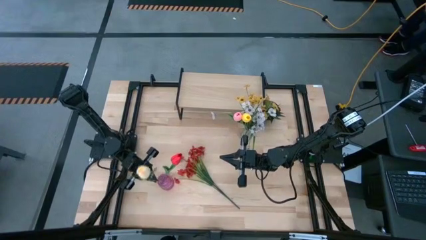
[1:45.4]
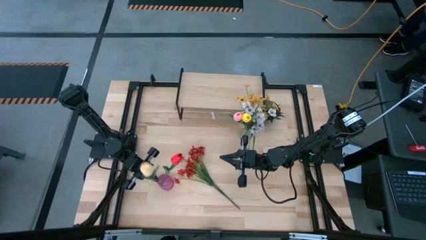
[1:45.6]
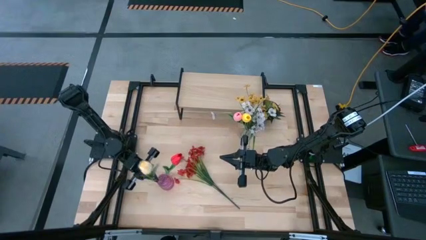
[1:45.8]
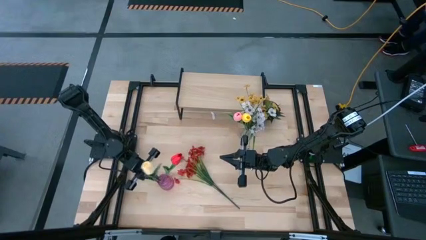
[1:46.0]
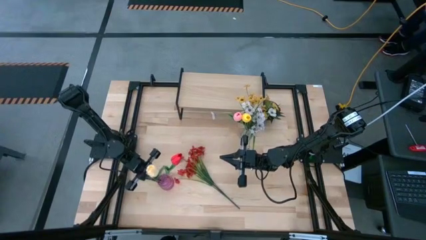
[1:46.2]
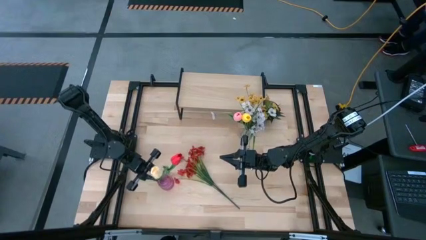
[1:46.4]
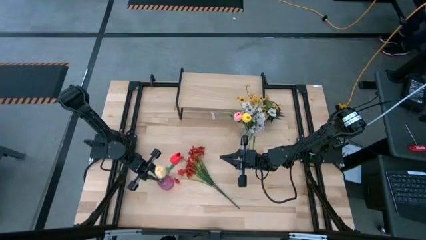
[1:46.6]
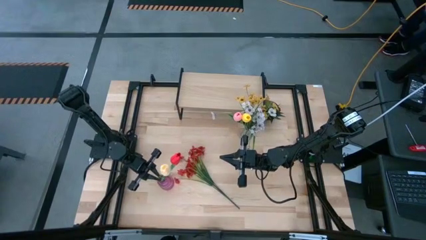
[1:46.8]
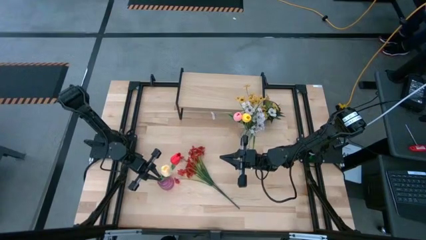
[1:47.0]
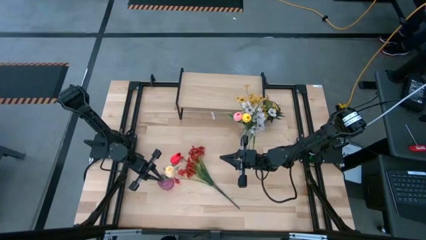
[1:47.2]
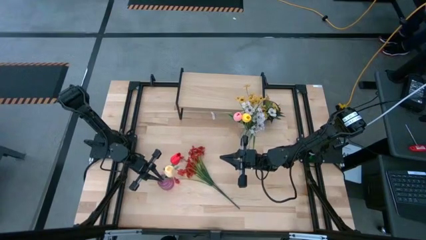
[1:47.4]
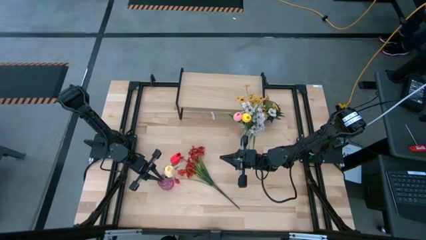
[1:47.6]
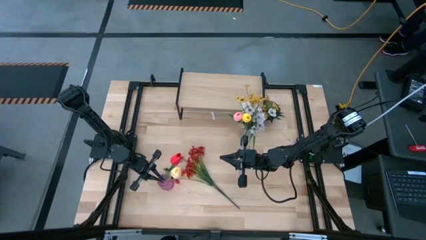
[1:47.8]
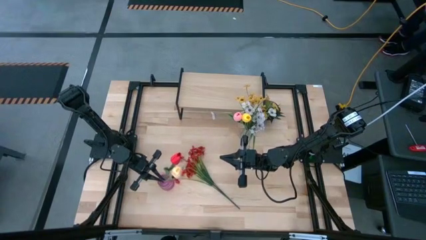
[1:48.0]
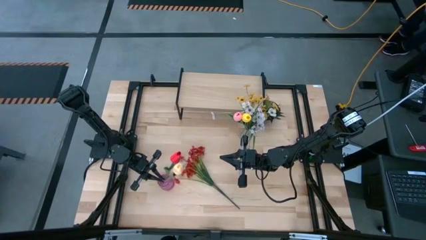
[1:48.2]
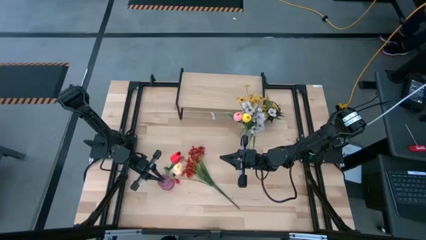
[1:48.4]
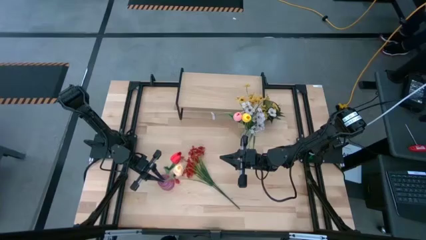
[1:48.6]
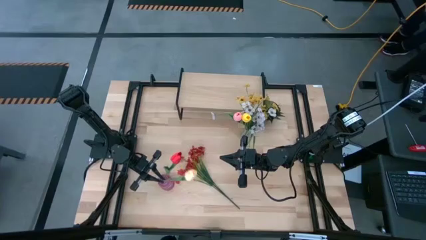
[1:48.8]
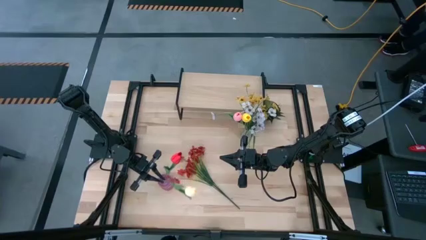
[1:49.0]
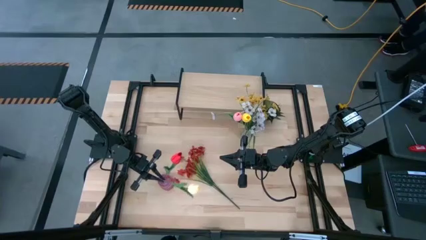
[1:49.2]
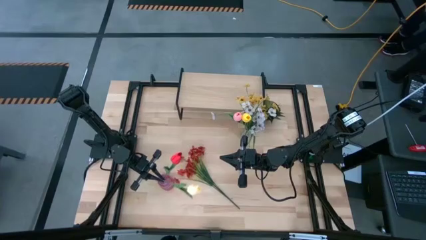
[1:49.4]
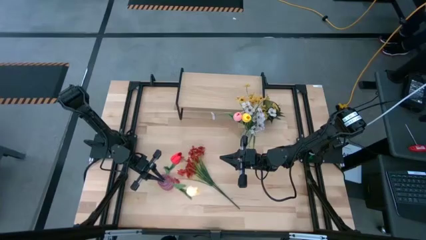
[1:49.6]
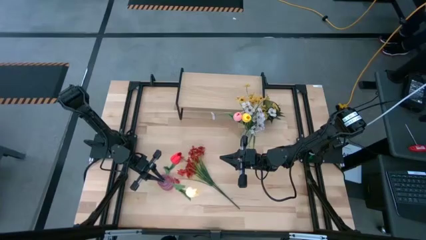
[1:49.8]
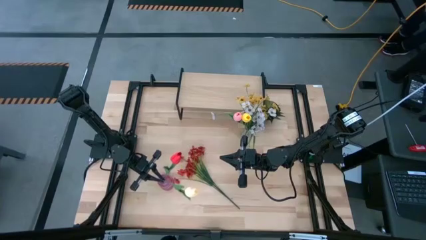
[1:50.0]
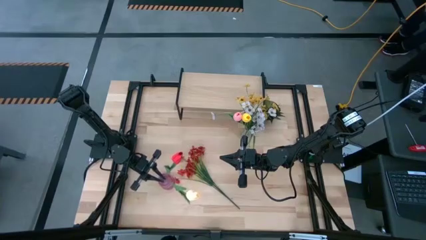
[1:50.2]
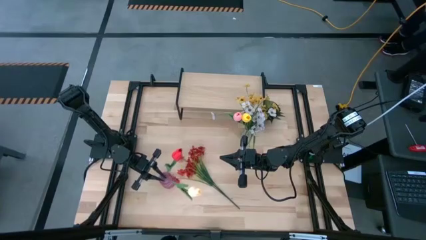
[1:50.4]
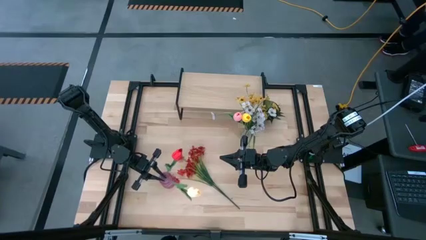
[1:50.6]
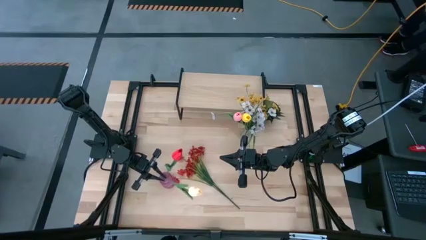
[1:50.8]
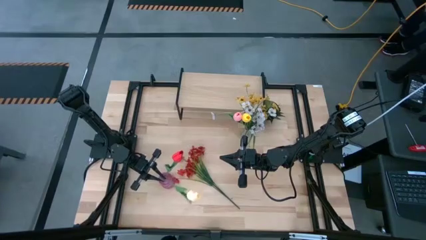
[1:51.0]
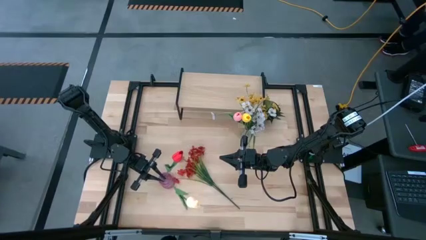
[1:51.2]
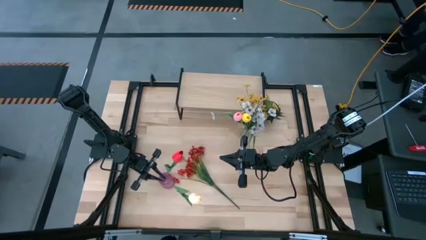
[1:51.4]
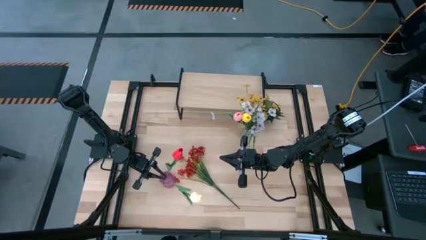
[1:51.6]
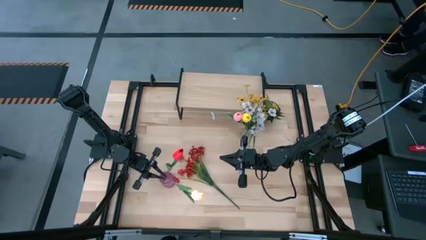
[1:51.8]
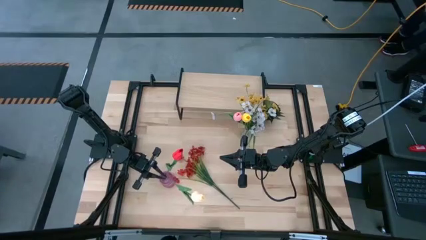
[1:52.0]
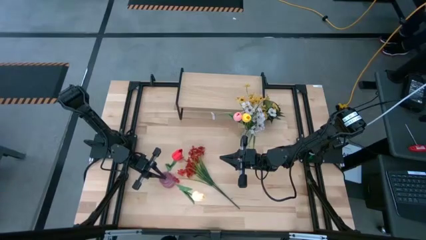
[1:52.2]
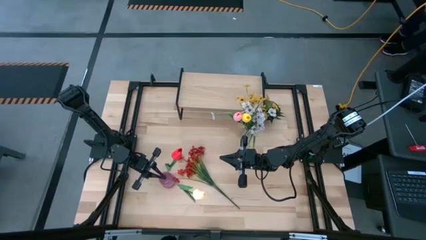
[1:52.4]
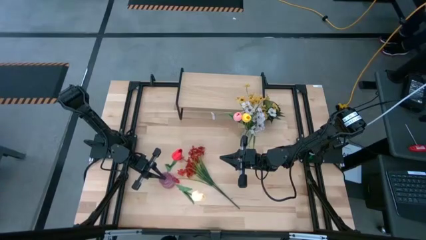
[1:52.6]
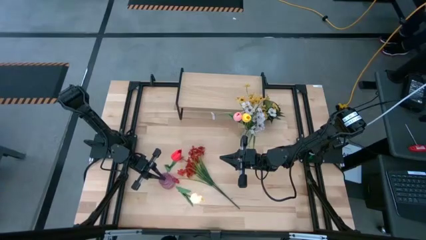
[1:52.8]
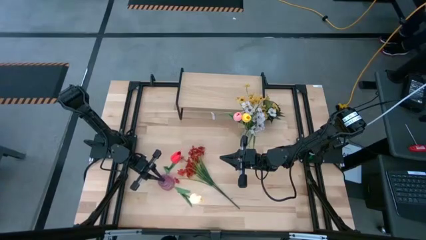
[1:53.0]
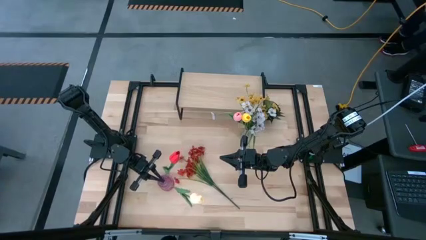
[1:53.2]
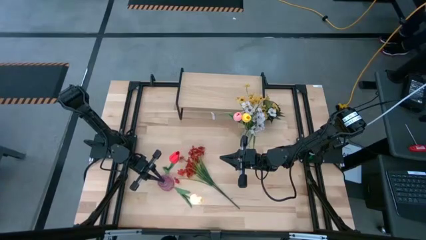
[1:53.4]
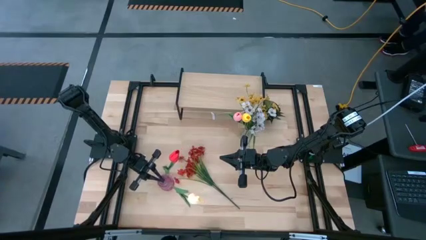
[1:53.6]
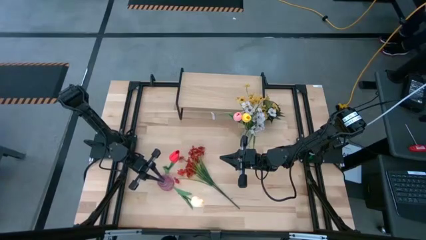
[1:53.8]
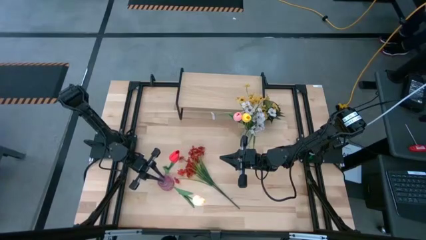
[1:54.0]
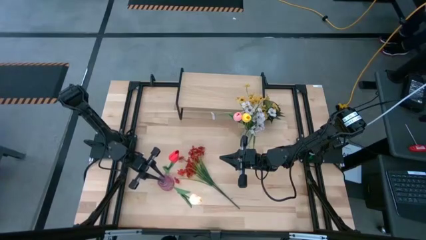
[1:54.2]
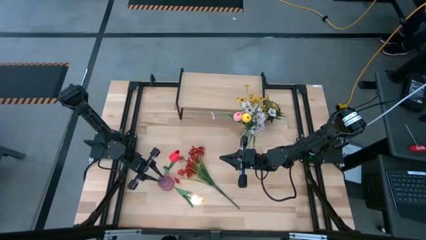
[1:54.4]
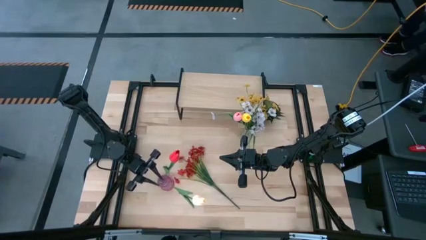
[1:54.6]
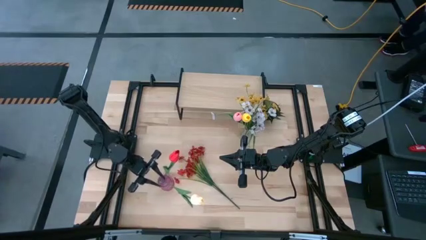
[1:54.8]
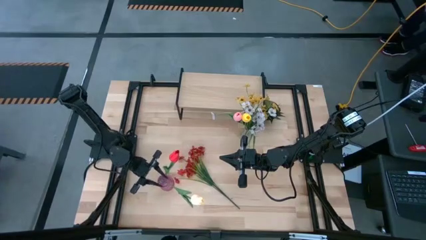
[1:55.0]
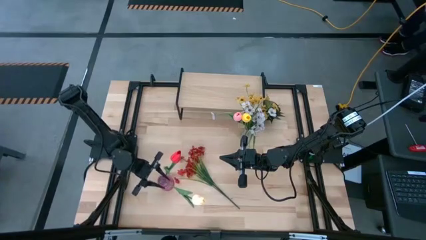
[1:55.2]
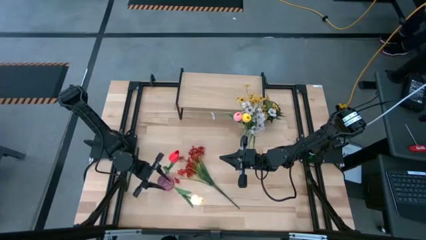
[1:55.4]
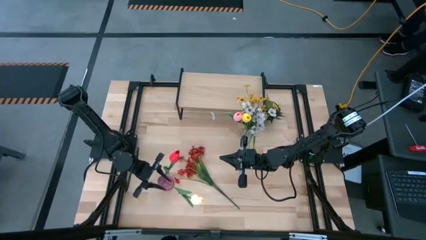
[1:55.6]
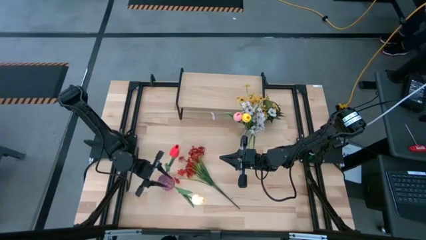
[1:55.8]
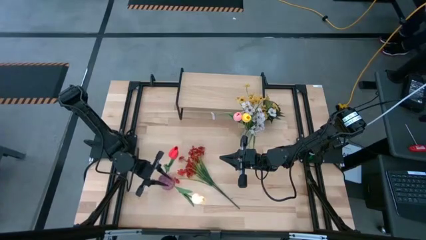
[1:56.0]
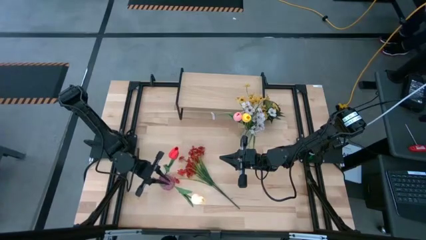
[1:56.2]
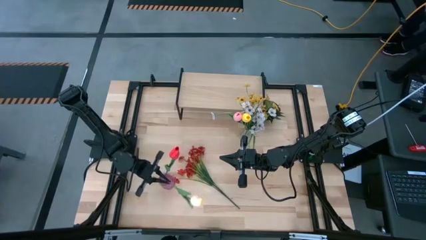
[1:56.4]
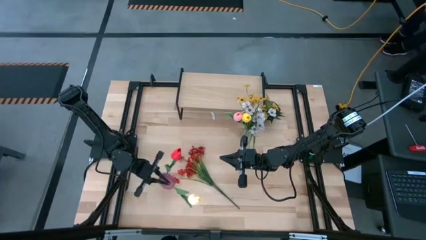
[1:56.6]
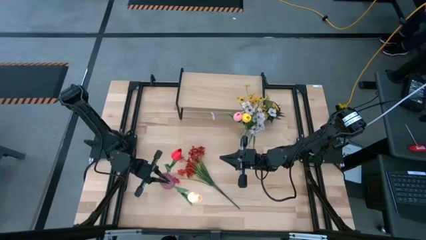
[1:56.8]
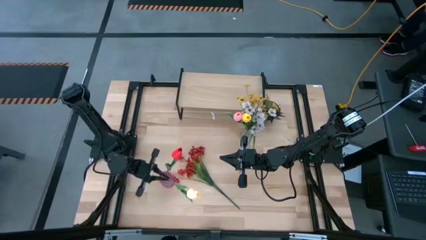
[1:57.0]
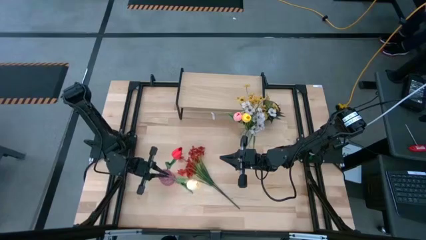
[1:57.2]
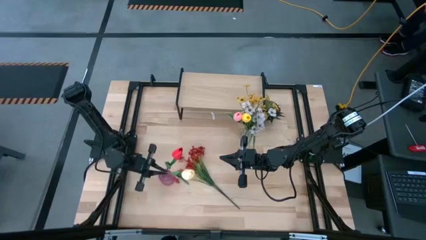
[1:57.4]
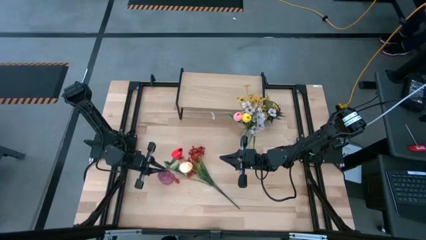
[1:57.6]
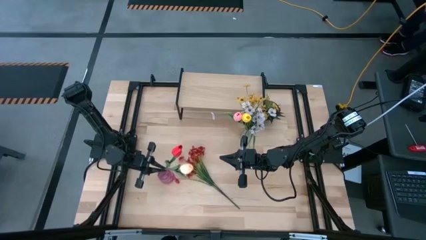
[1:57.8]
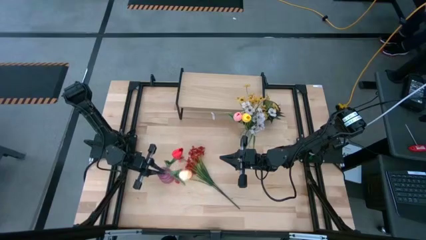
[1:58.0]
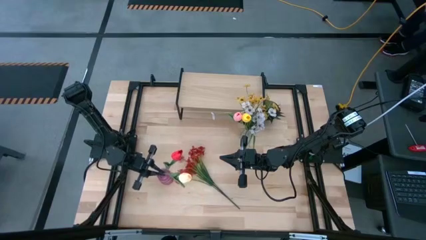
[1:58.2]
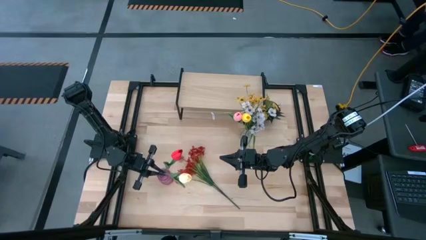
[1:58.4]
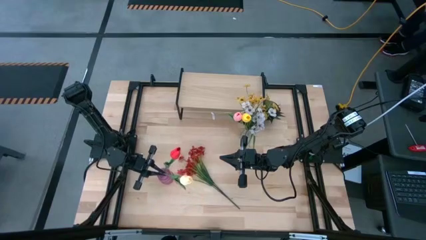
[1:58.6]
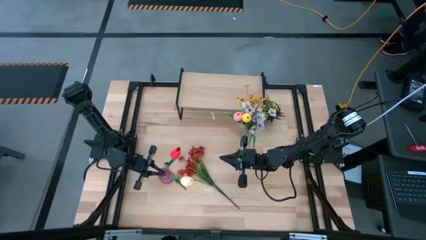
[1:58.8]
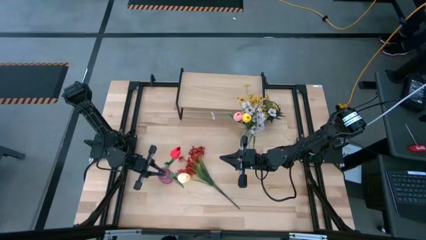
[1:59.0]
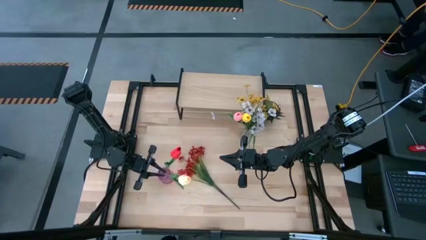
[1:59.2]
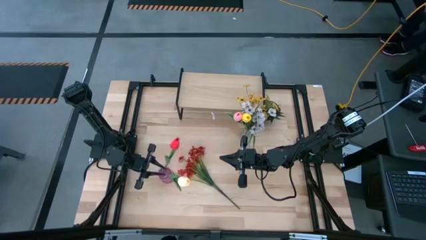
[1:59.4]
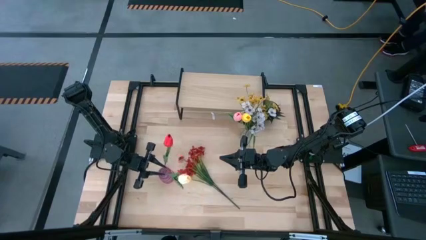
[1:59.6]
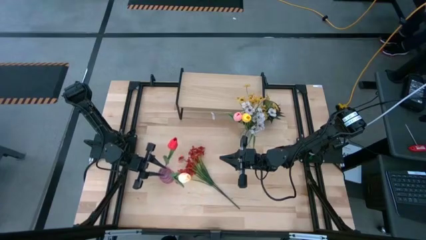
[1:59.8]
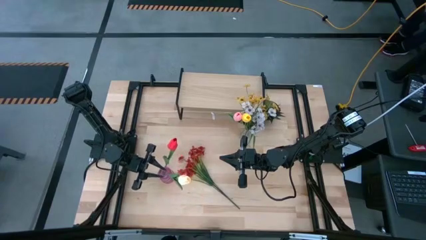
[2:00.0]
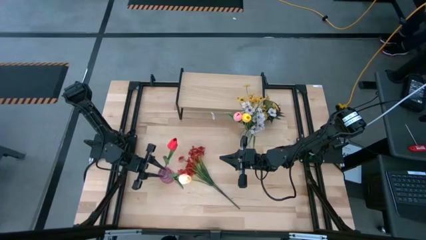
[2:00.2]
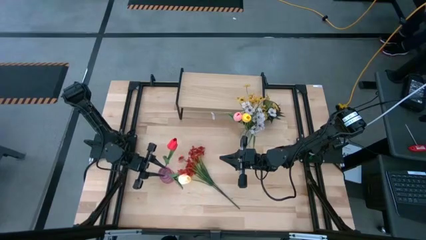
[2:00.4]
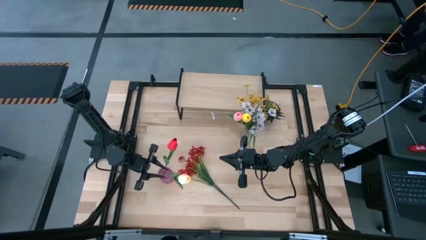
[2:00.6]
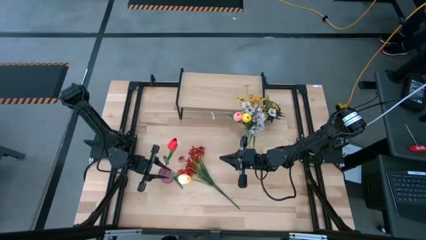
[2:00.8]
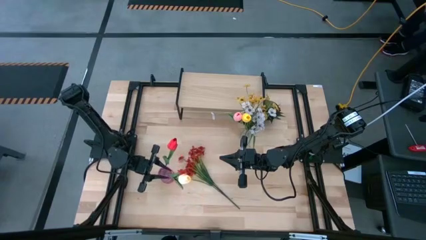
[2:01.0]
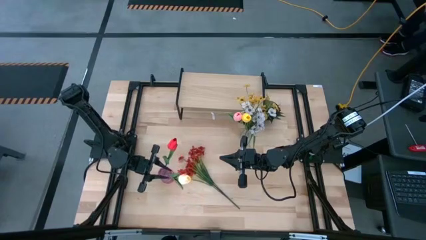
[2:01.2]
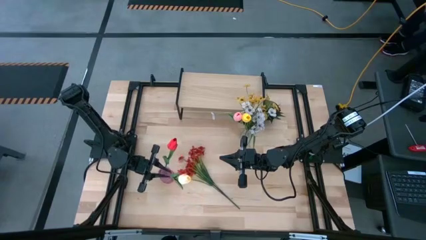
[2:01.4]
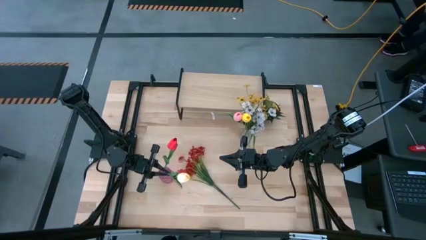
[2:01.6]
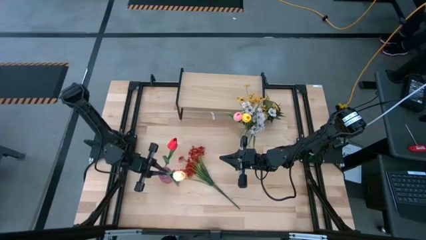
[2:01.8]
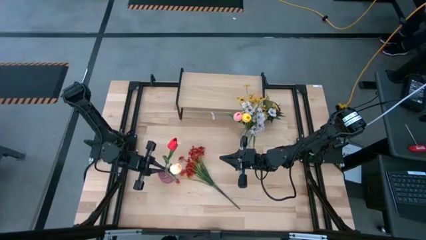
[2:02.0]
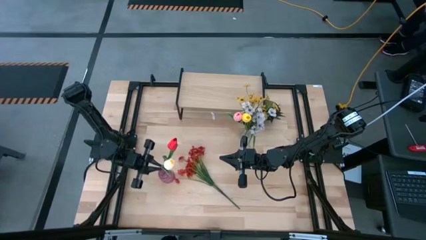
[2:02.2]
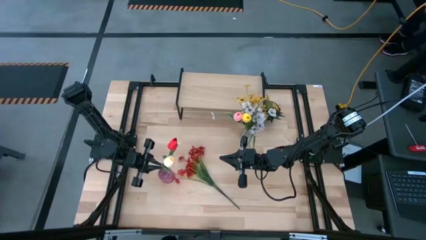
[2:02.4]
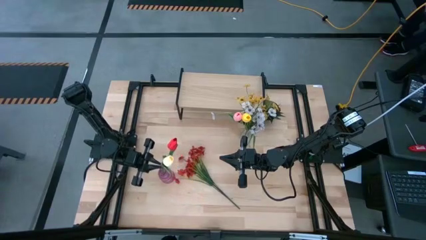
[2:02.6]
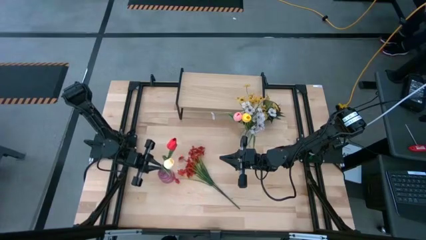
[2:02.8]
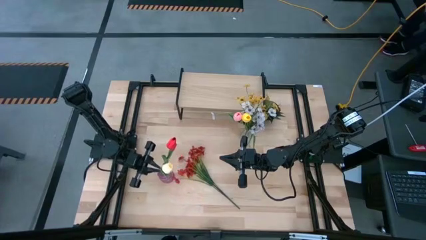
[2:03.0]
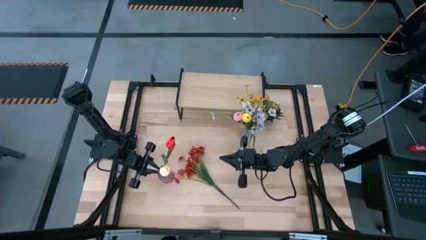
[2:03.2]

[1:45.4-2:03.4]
Task: Pick and place flowers into a vace then onto a shelf
Put the light yellow flower into the violet vase
